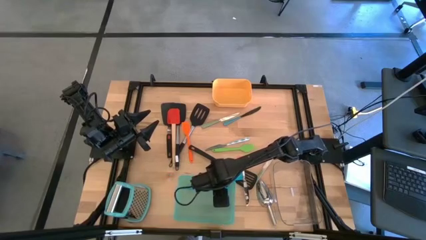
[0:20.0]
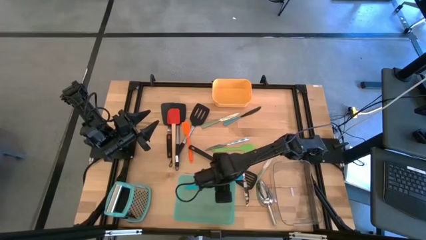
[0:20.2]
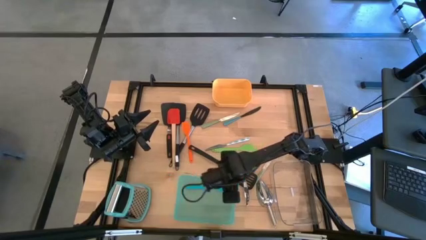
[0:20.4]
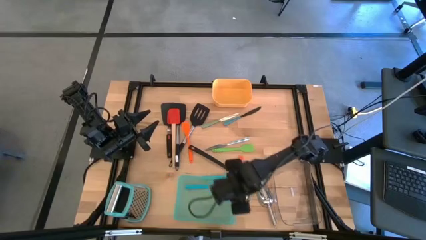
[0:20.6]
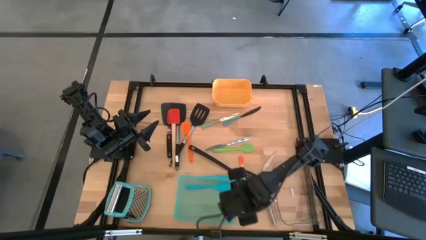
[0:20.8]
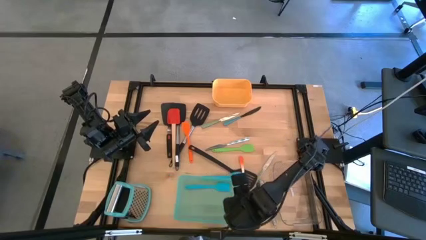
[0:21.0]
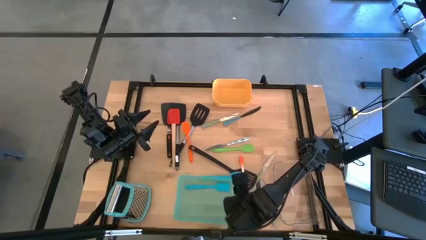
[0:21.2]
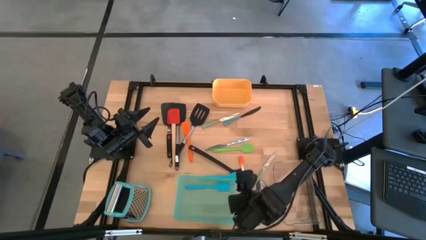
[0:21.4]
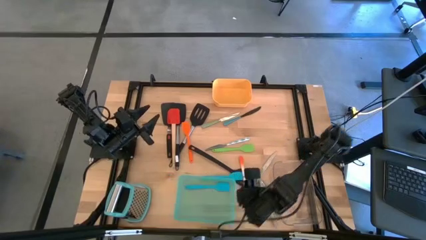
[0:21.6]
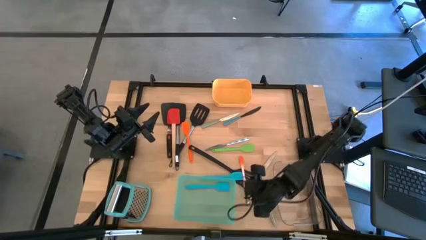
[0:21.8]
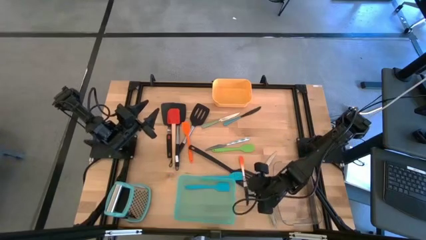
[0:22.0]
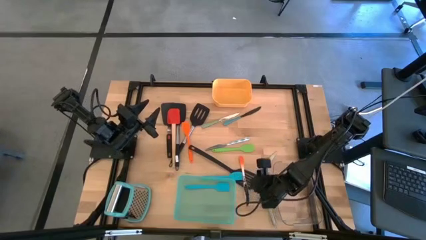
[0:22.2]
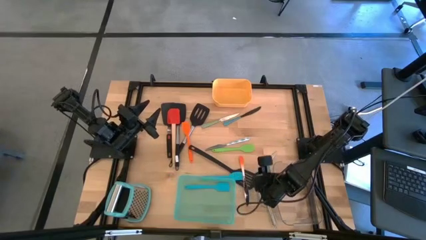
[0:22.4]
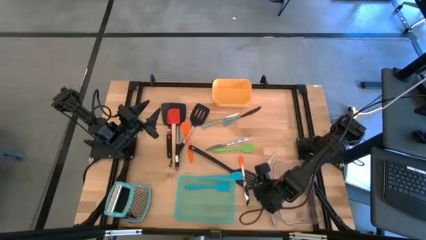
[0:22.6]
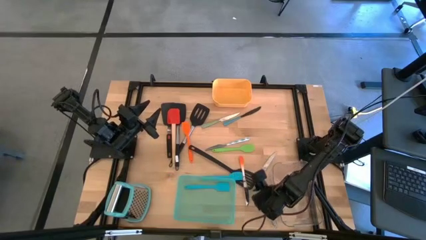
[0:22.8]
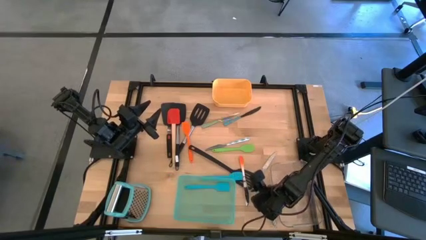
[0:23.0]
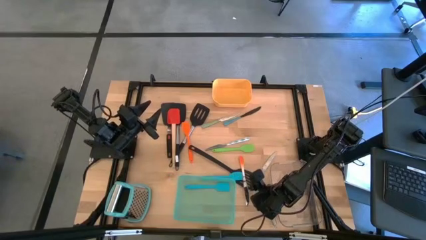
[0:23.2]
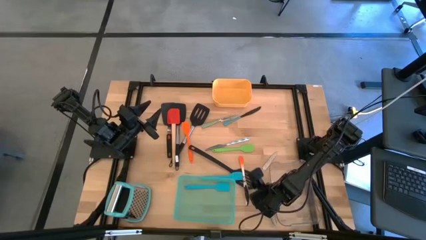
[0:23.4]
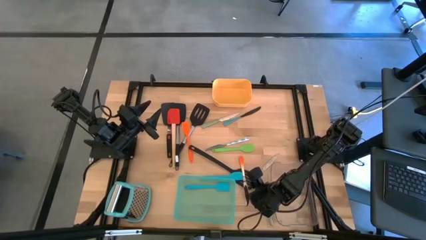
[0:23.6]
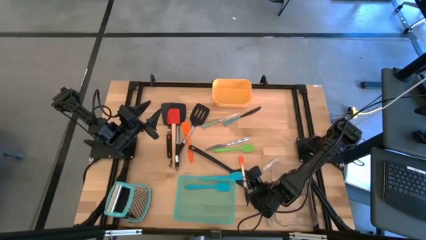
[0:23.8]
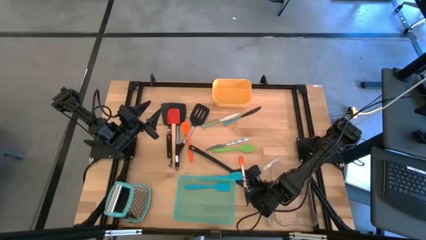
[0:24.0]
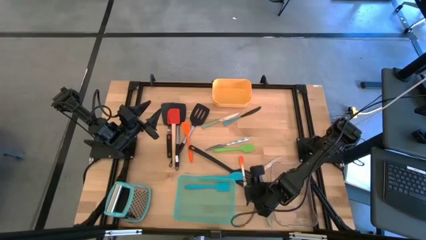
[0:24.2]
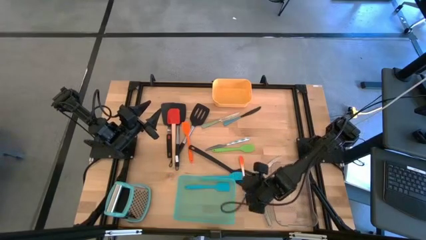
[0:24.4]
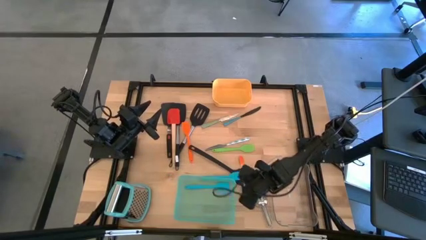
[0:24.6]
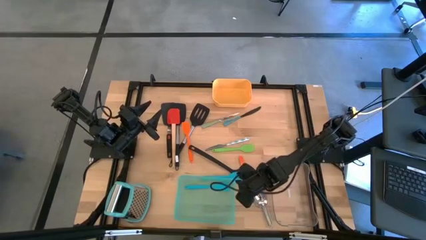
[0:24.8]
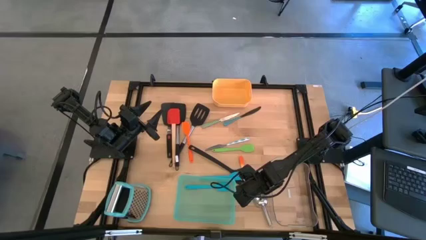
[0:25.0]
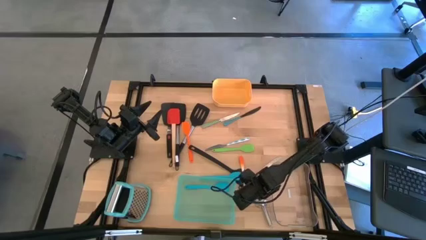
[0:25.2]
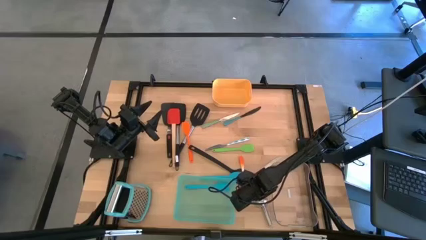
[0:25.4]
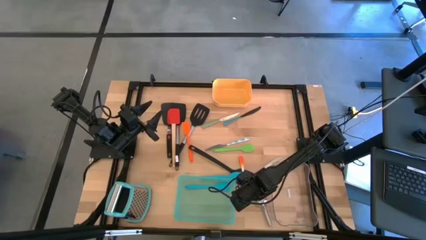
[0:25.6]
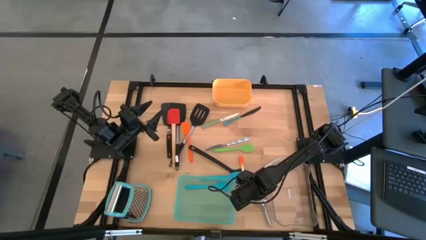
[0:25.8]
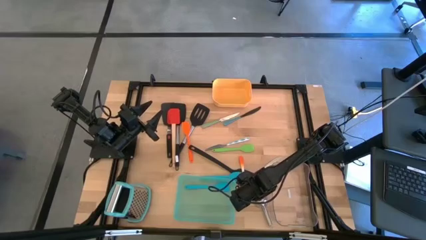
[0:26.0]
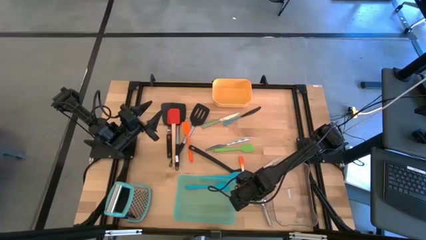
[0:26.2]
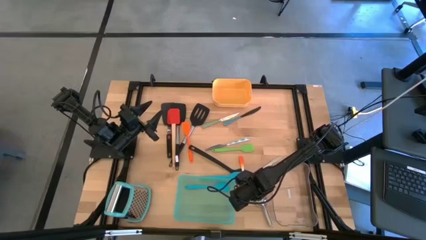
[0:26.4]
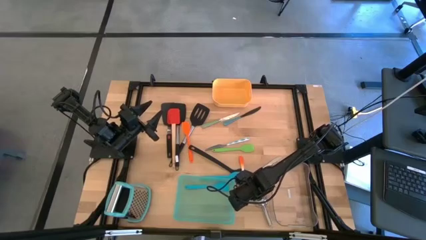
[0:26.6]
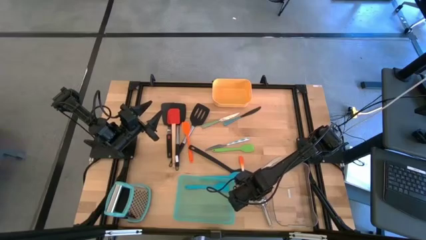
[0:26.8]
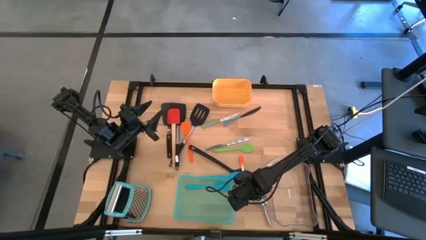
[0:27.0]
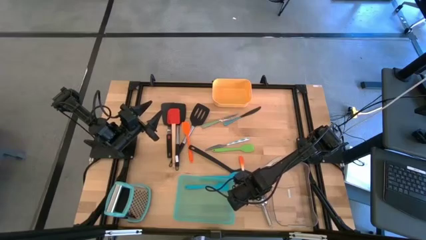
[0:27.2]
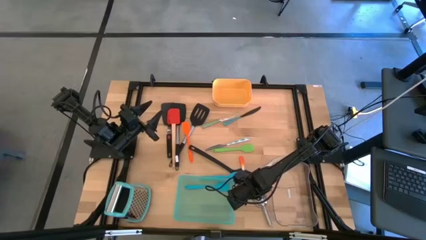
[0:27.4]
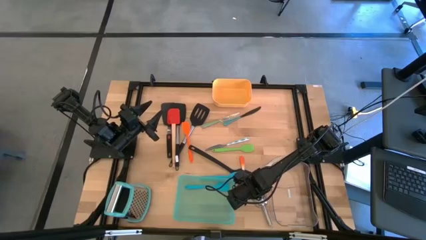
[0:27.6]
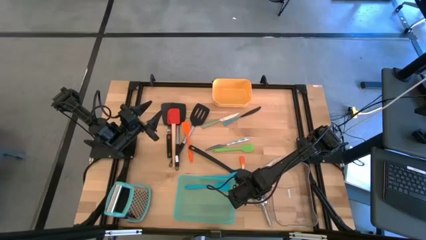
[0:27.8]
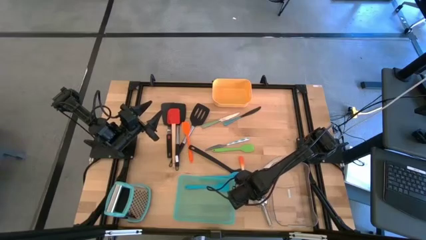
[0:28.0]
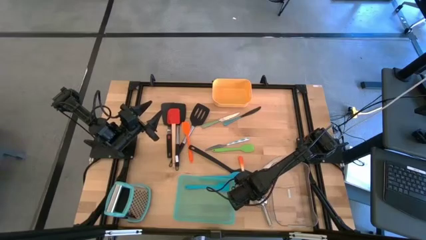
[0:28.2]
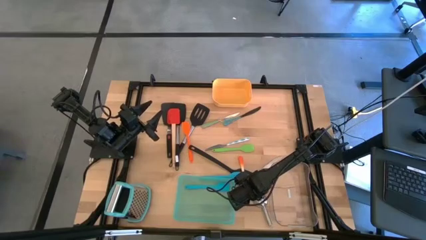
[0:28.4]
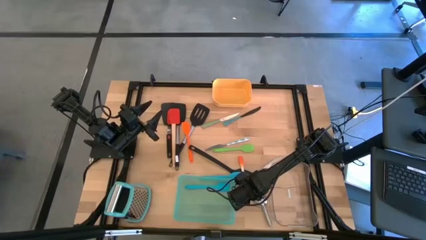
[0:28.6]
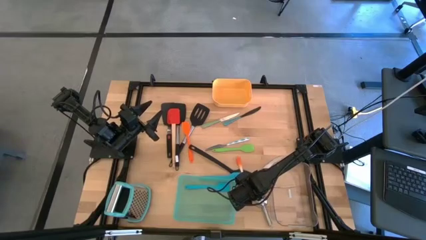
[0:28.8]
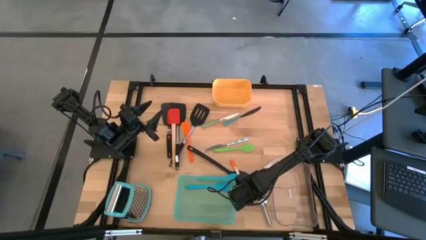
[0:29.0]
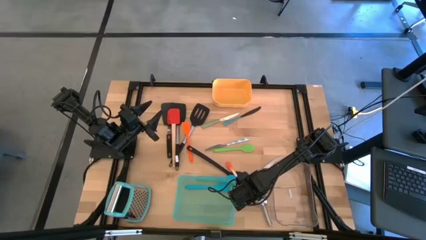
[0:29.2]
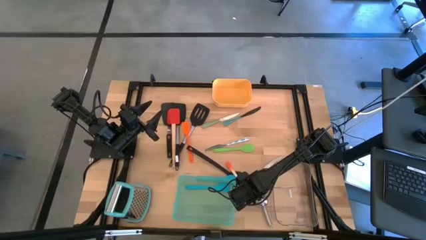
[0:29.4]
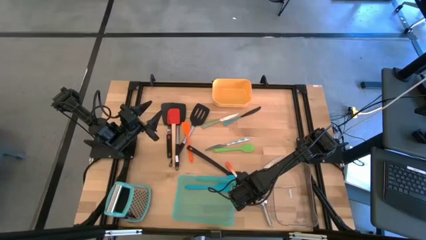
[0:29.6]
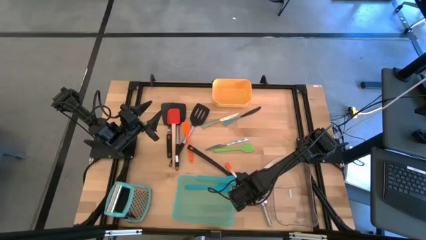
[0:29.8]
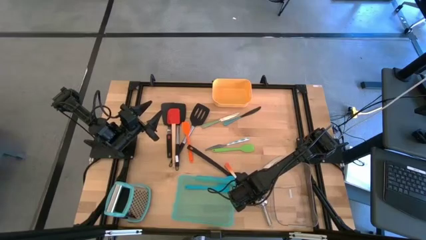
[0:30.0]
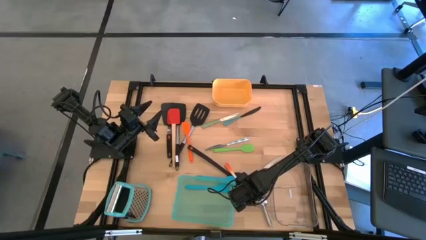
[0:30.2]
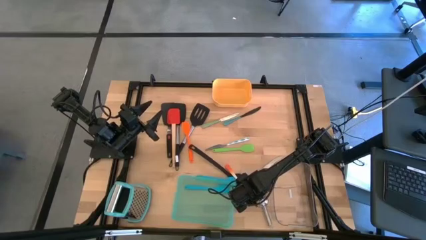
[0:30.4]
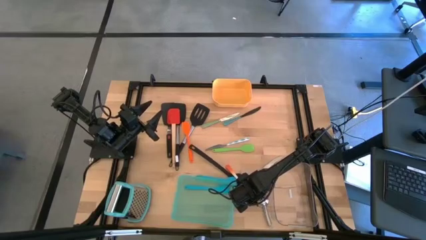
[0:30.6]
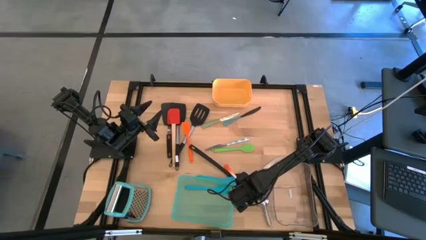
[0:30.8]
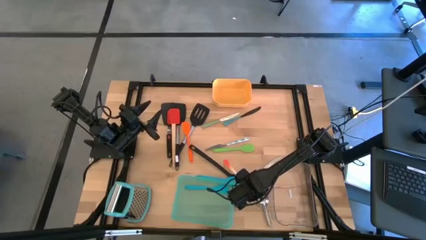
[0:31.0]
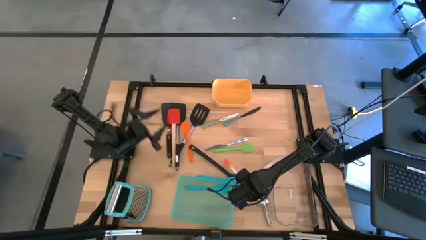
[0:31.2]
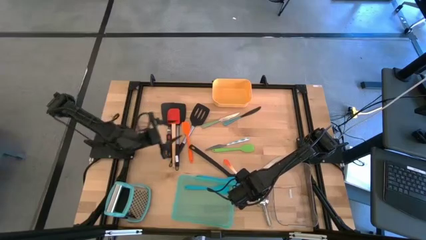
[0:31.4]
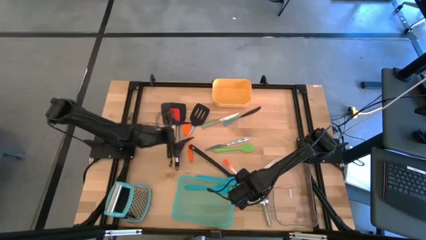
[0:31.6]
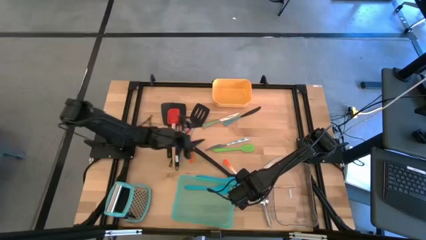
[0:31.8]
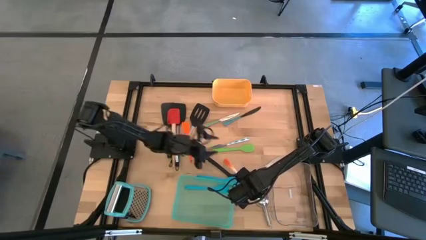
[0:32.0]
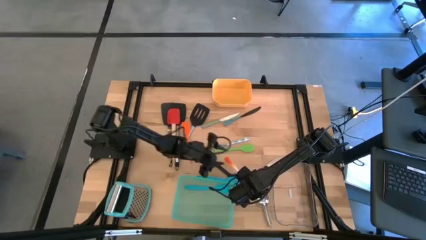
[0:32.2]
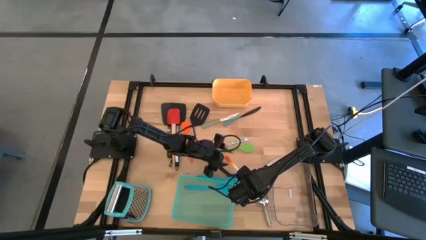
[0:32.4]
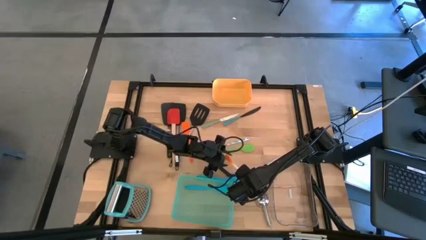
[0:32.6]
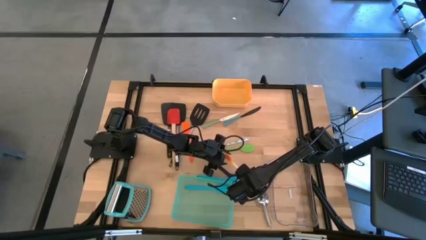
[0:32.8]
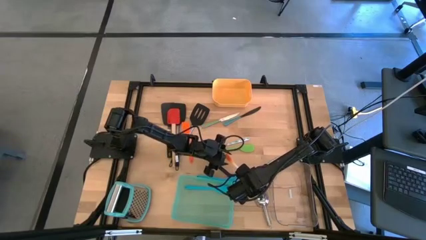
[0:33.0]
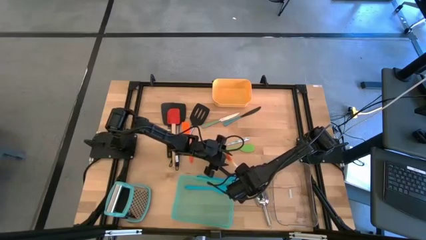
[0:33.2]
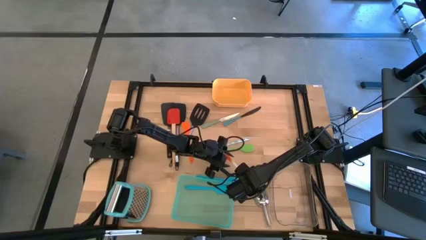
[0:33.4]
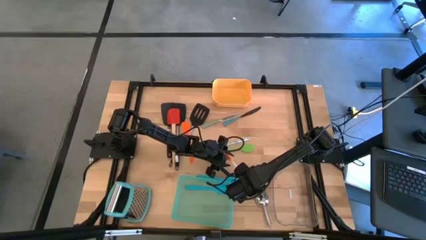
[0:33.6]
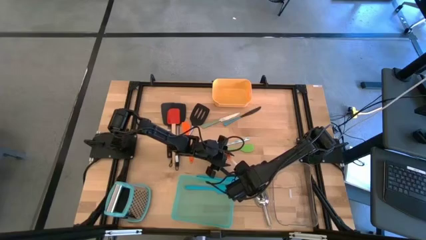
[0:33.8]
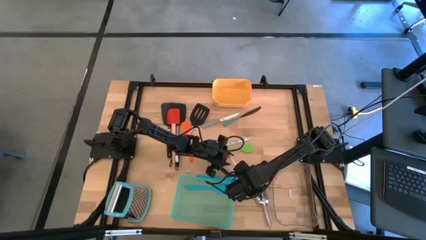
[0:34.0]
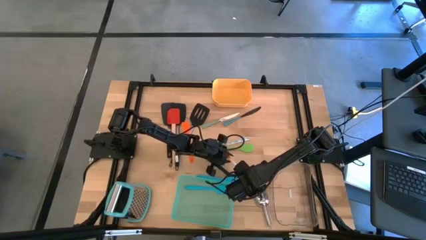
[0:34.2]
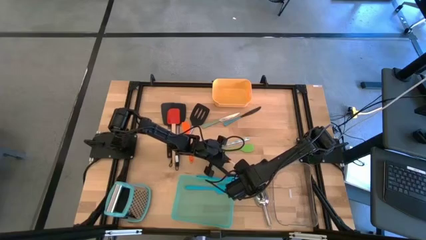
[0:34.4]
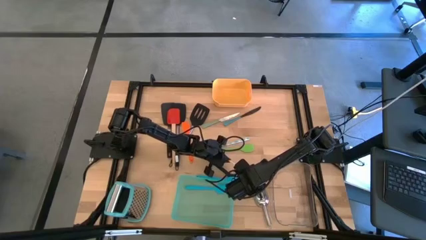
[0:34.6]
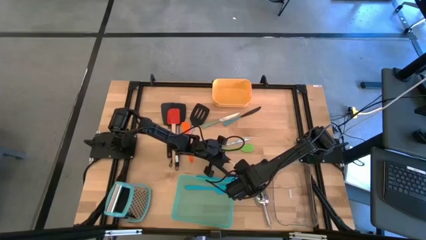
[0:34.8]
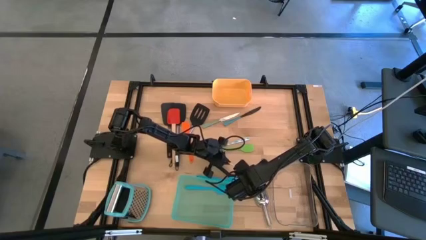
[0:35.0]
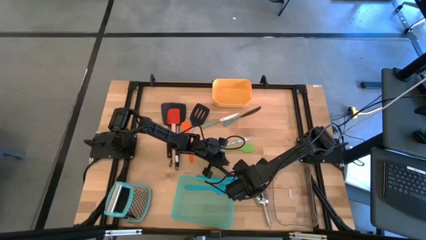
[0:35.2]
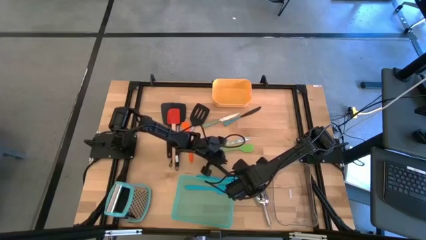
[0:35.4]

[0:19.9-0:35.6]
Task: Pick & Place Kitchen Items
Put the orange table knife into the transparent bin
